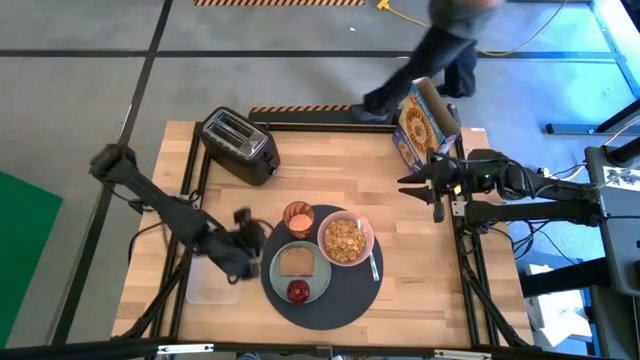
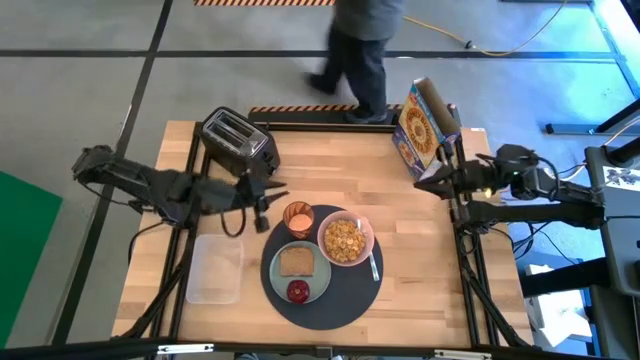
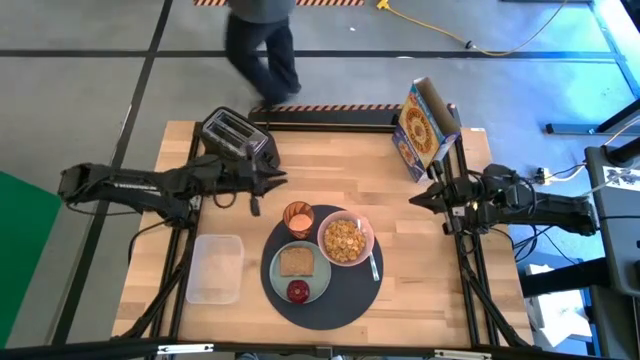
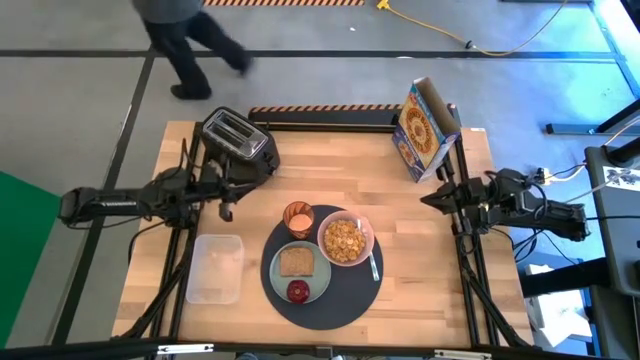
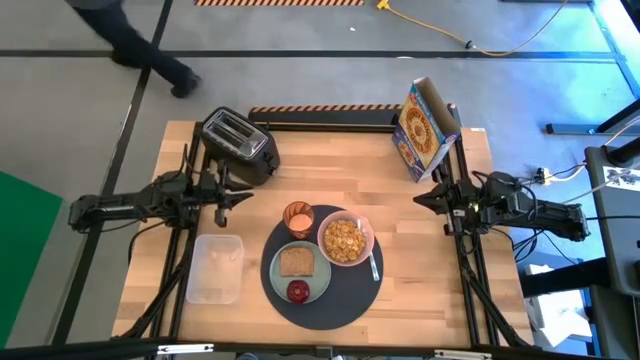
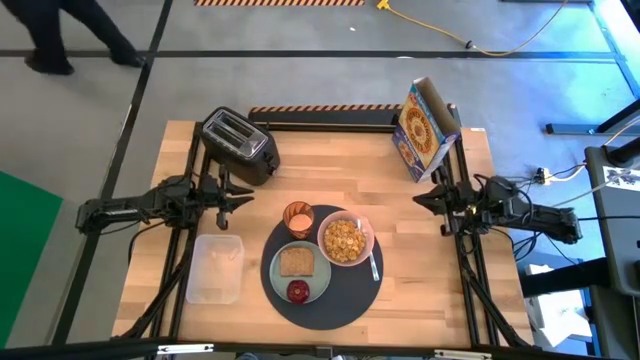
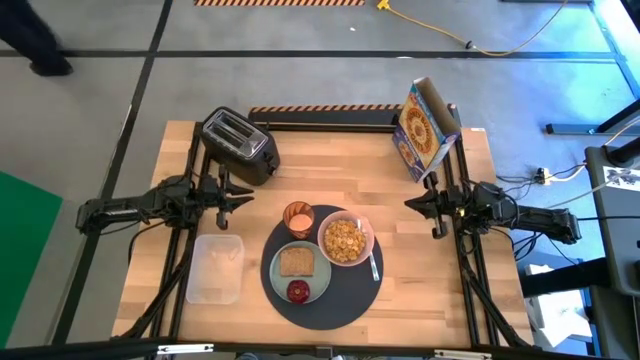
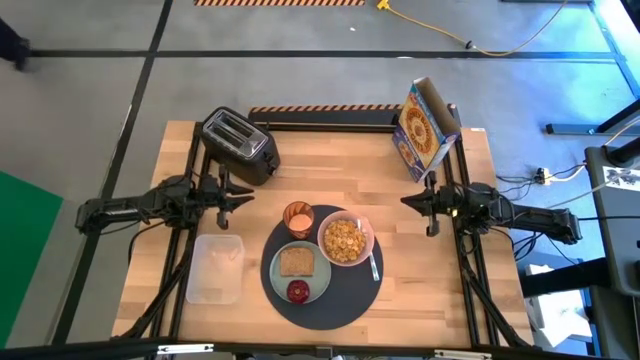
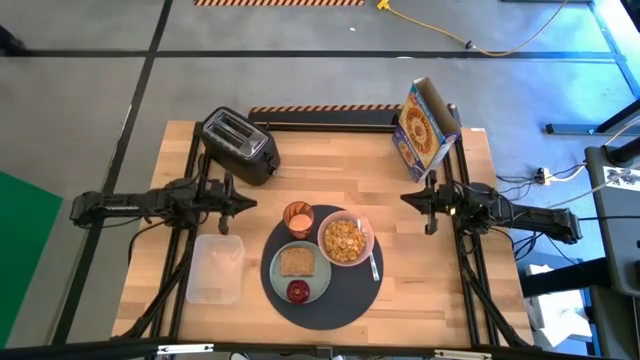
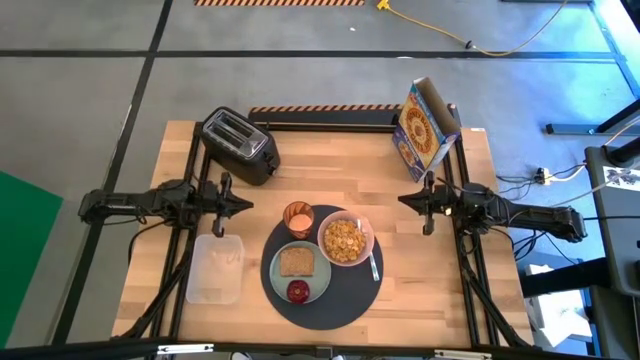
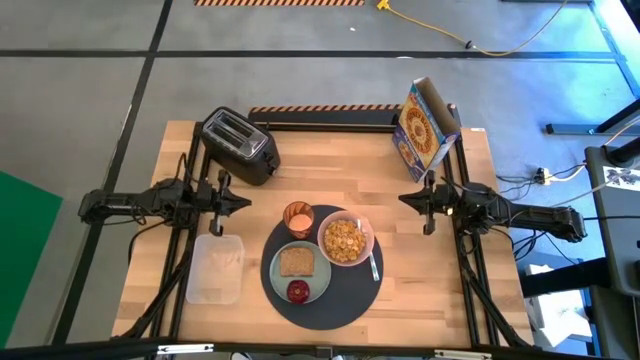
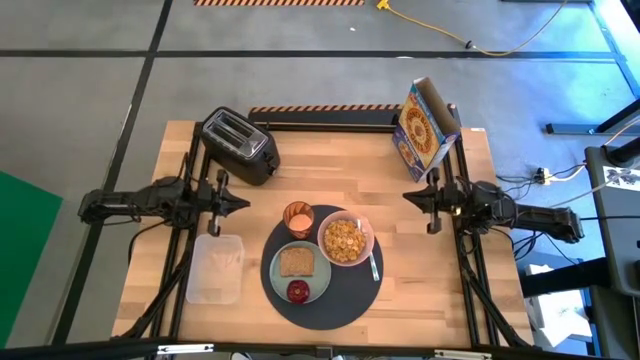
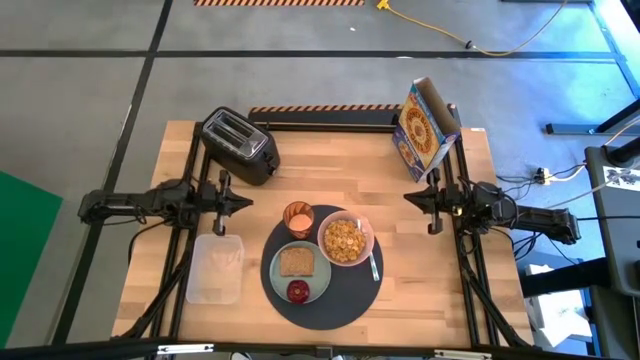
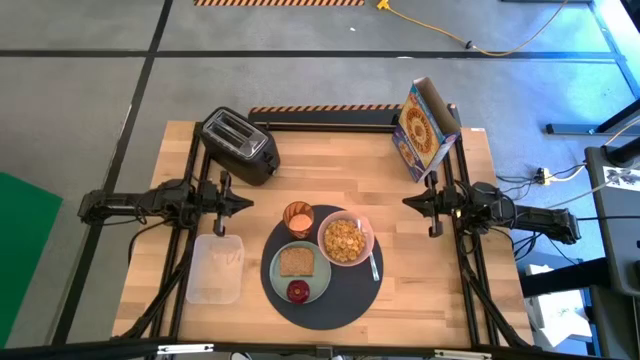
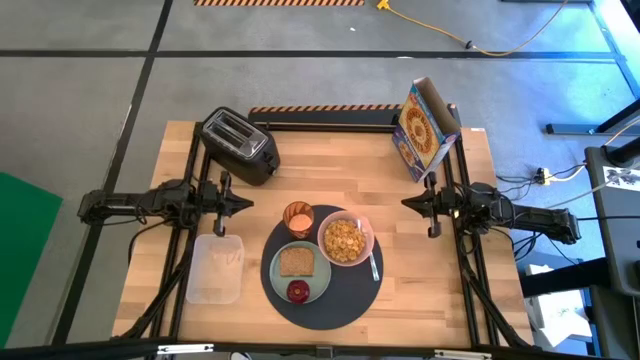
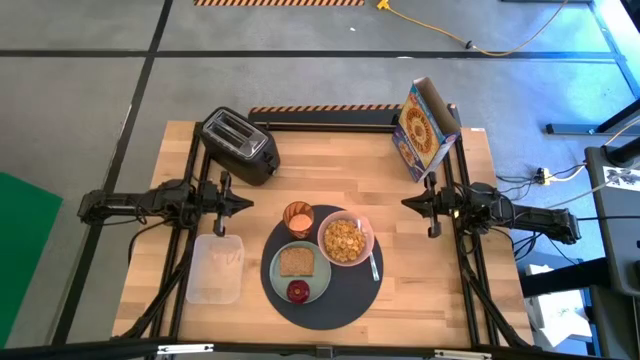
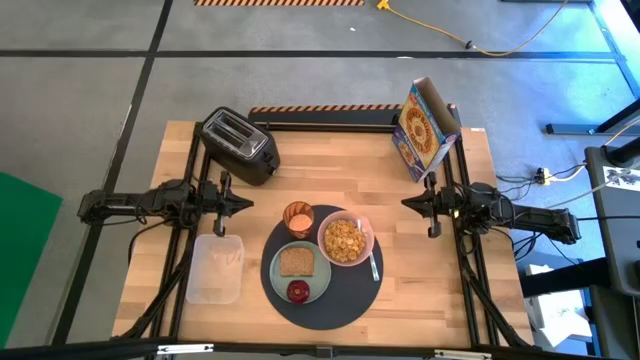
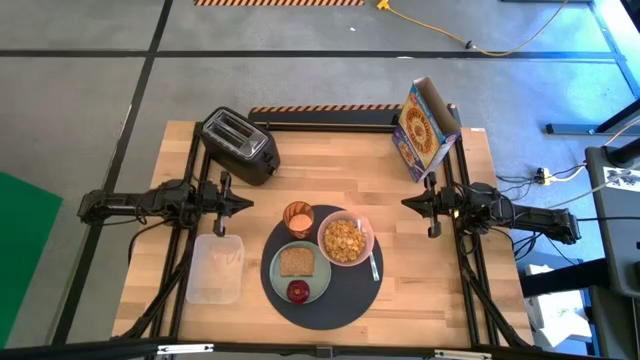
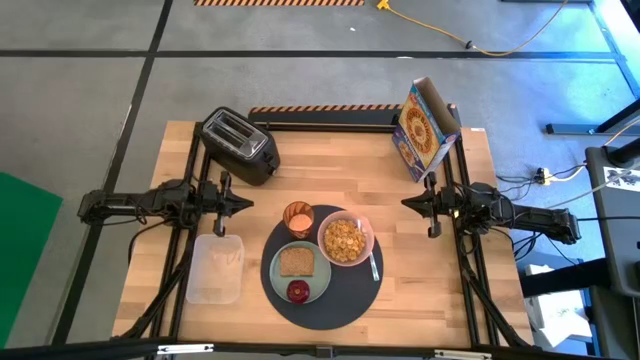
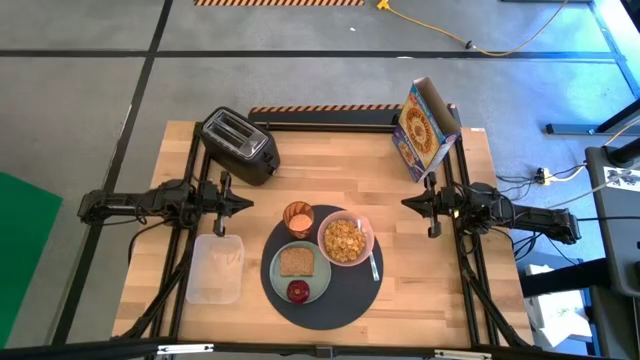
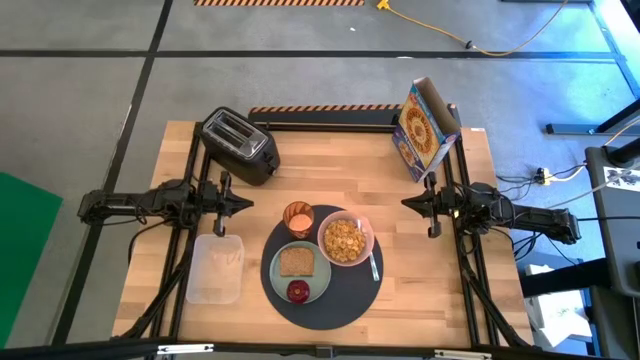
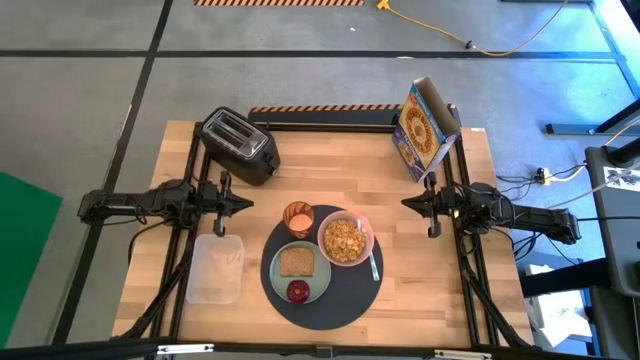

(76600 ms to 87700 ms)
Task: Arrange a breakfast setting
Return to Home Position

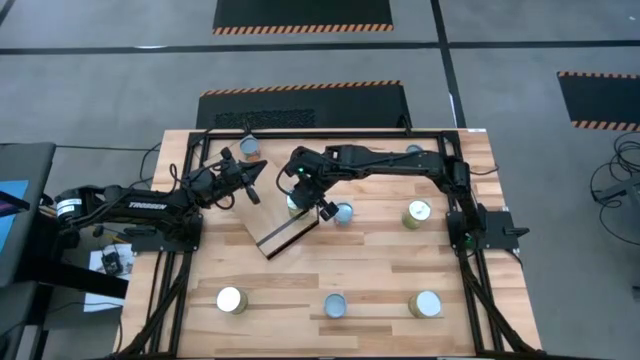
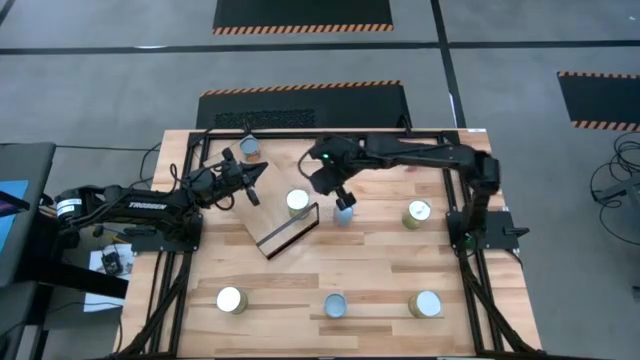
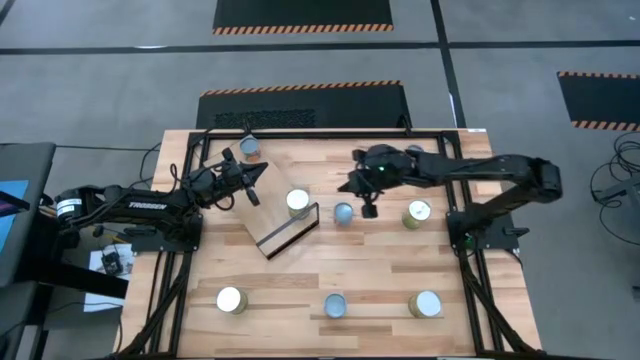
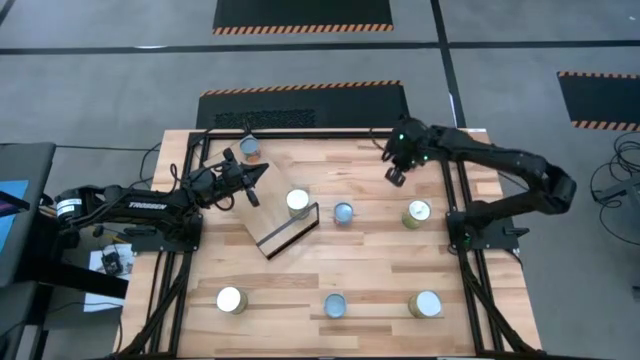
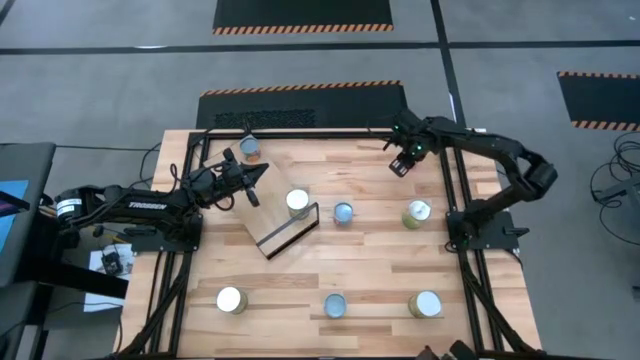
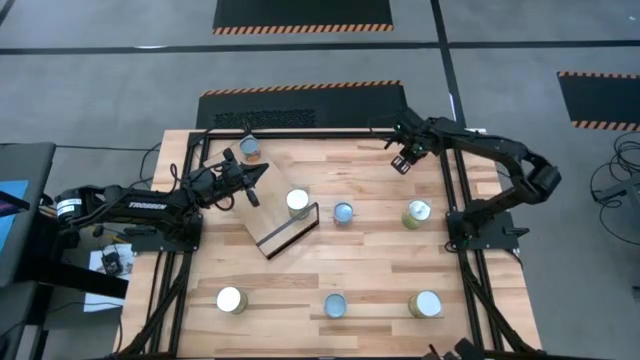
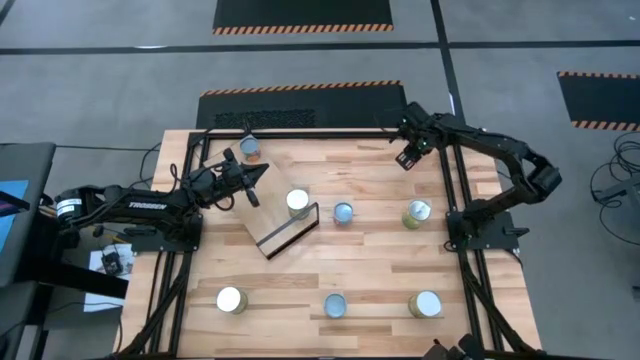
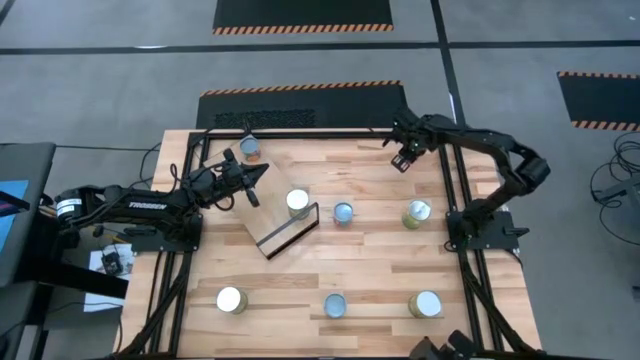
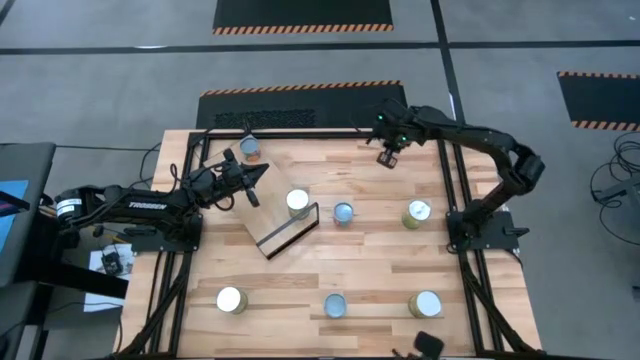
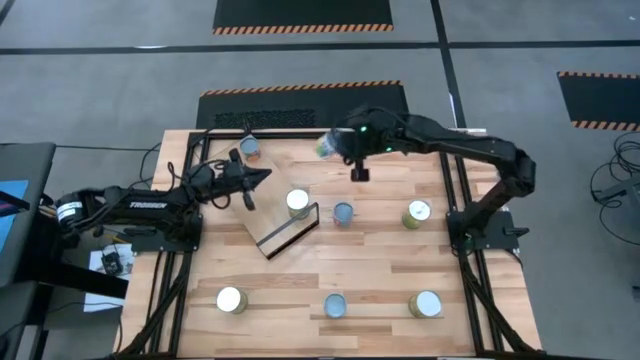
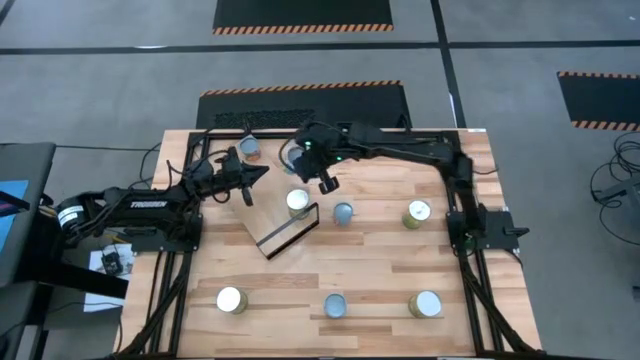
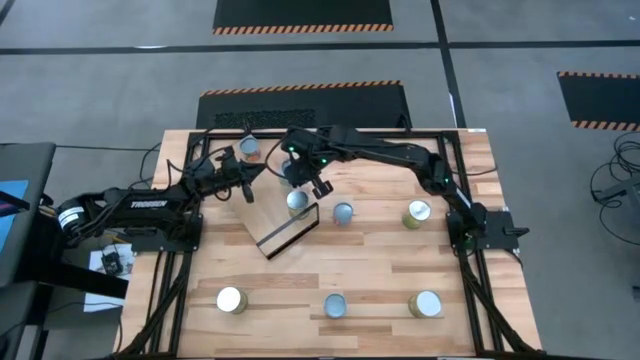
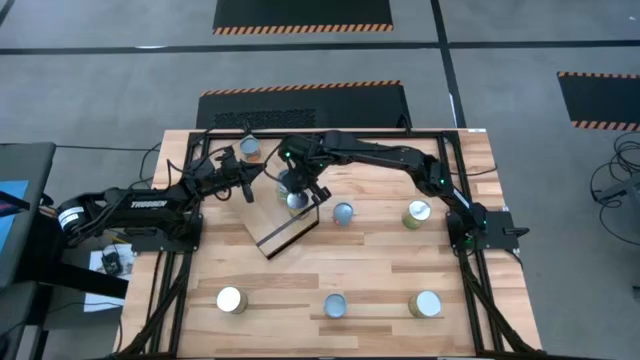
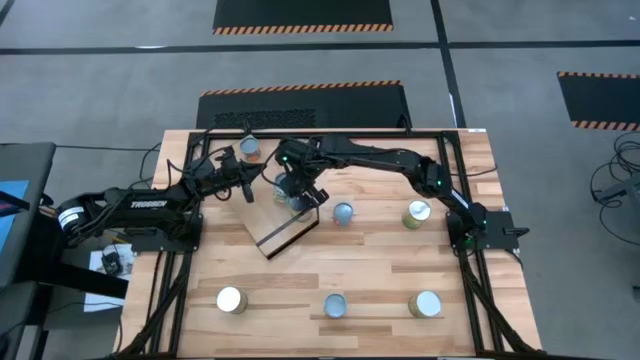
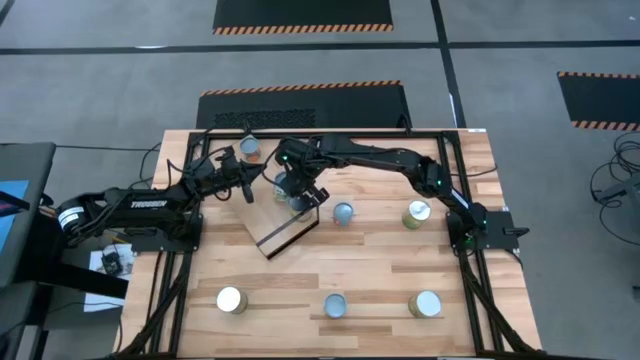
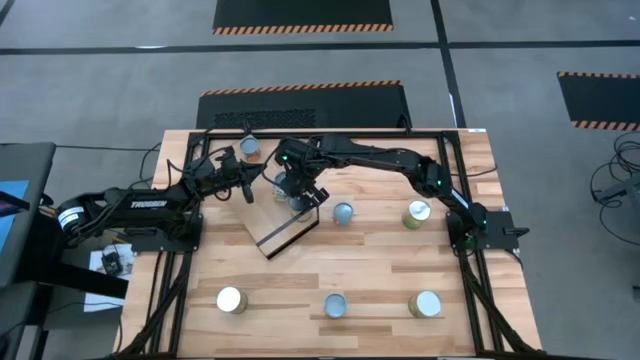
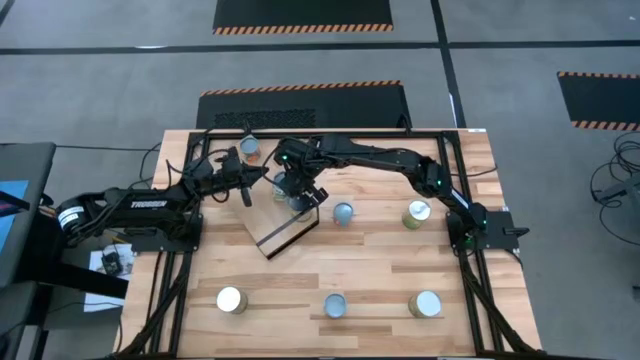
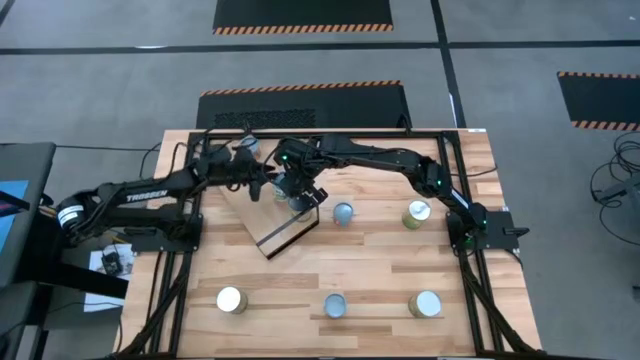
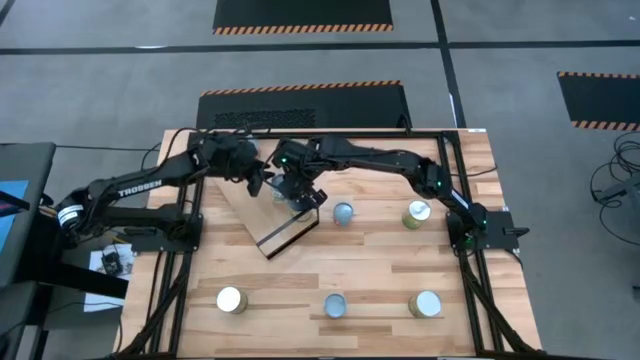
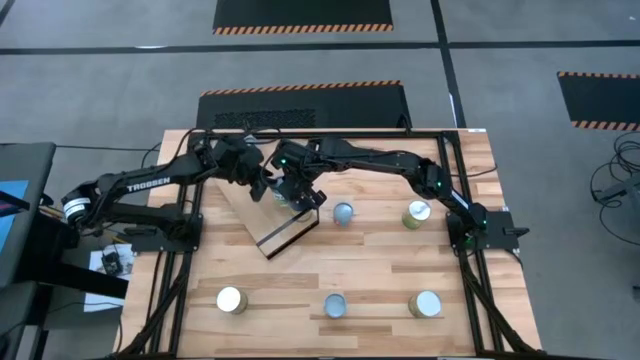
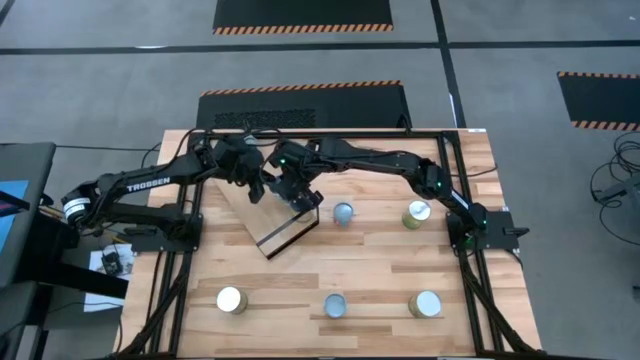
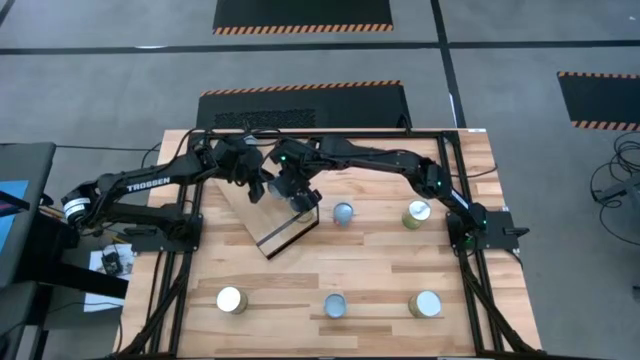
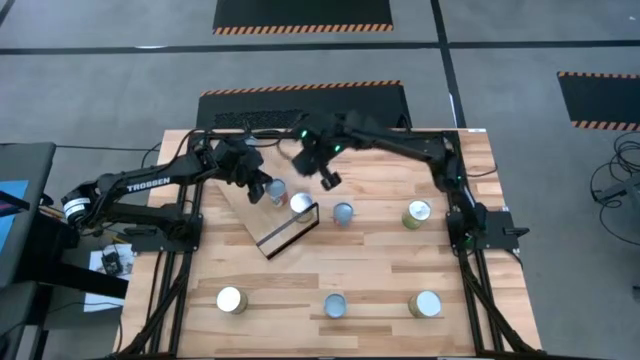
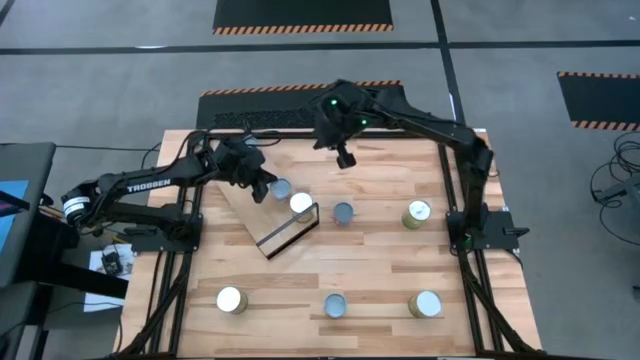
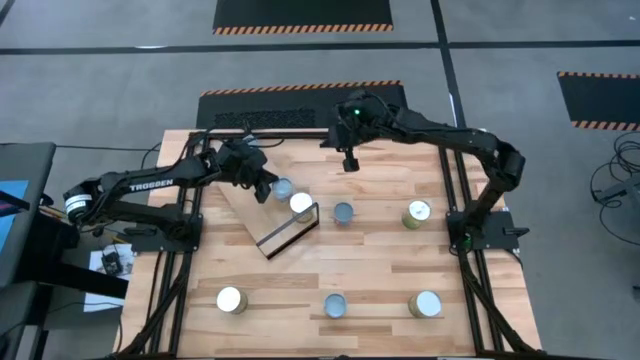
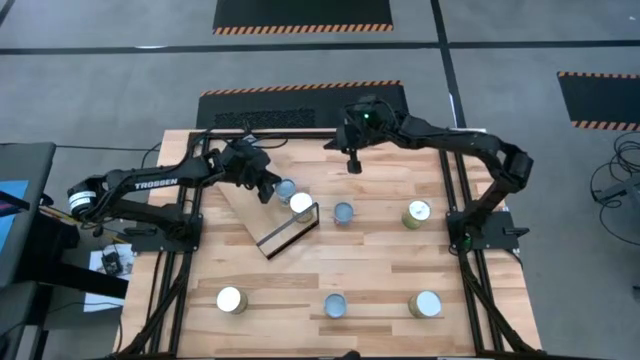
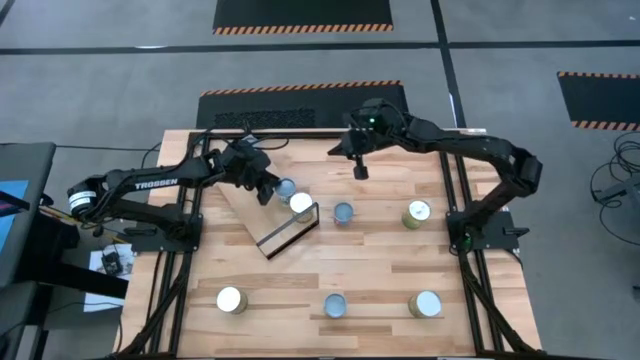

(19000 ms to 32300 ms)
Task: Pick and place cans onto a shelf
Put the canned mixed fruits on the shelf
